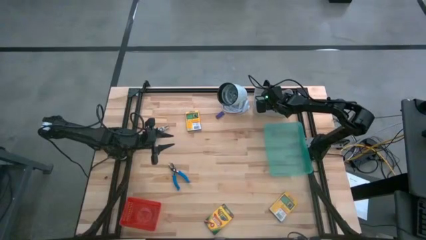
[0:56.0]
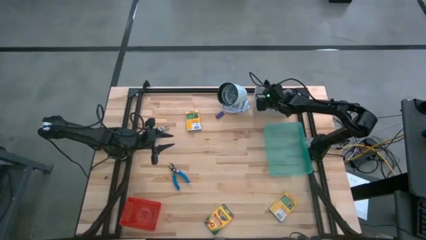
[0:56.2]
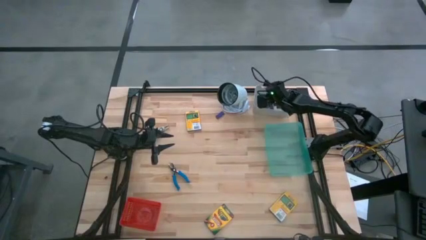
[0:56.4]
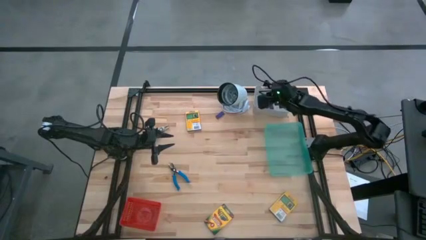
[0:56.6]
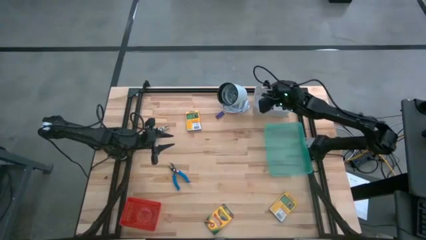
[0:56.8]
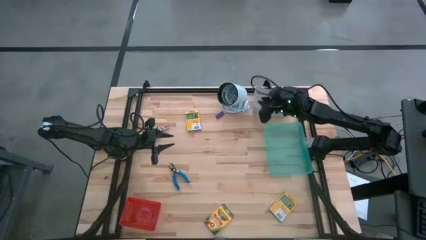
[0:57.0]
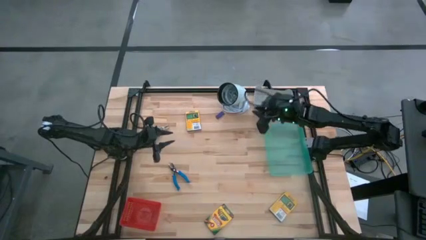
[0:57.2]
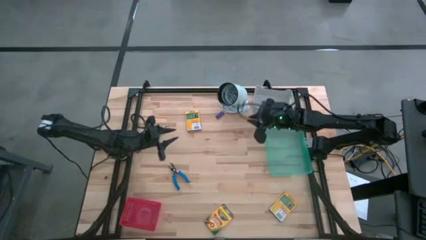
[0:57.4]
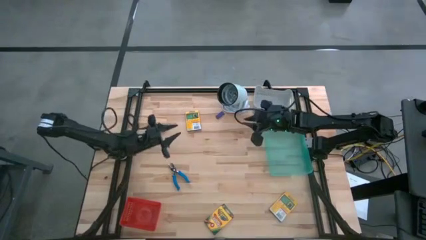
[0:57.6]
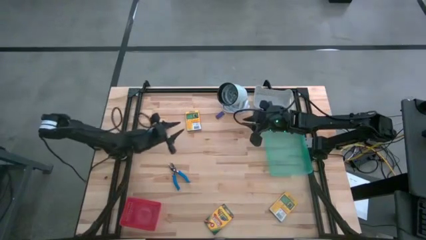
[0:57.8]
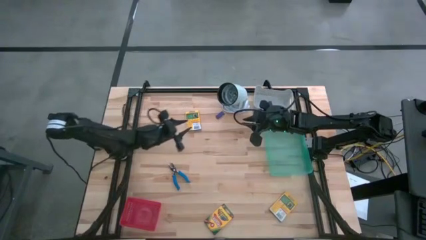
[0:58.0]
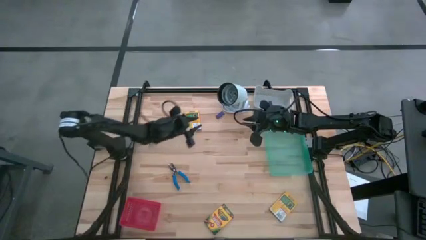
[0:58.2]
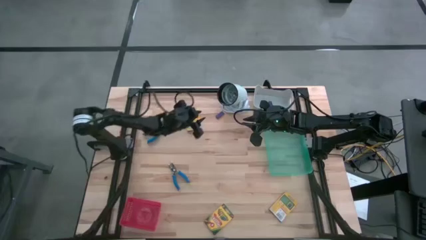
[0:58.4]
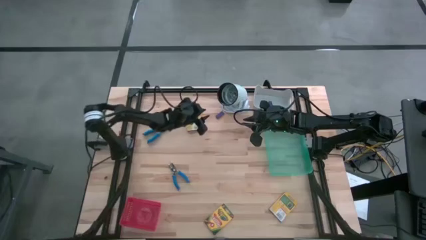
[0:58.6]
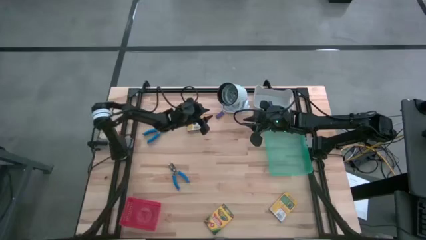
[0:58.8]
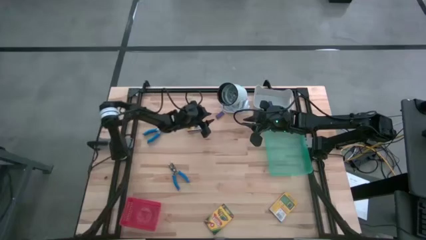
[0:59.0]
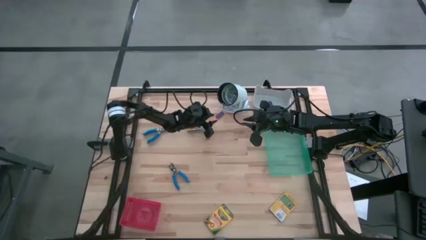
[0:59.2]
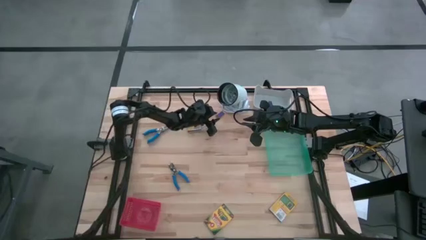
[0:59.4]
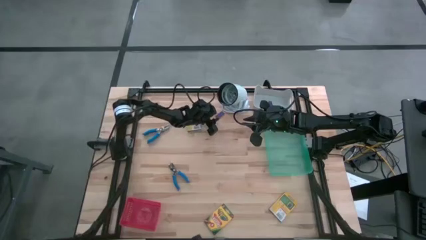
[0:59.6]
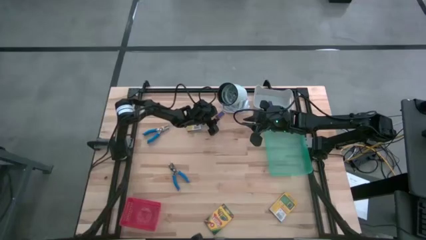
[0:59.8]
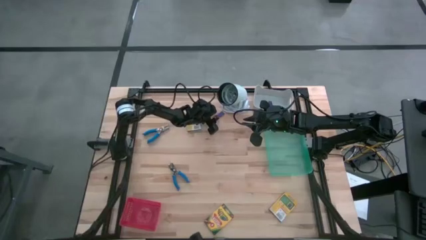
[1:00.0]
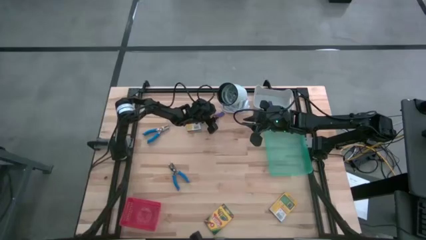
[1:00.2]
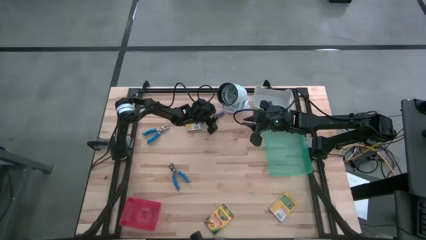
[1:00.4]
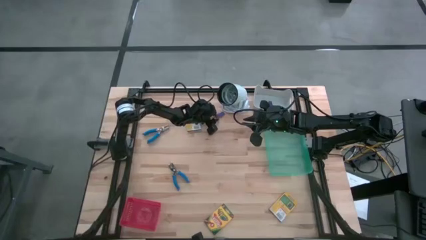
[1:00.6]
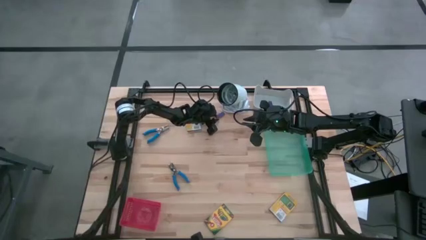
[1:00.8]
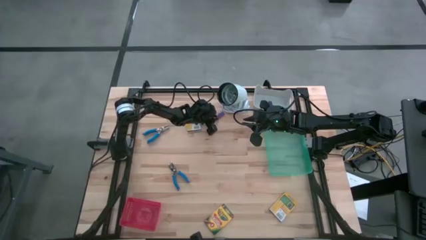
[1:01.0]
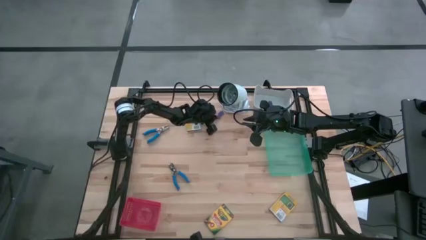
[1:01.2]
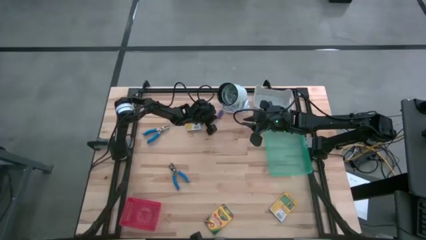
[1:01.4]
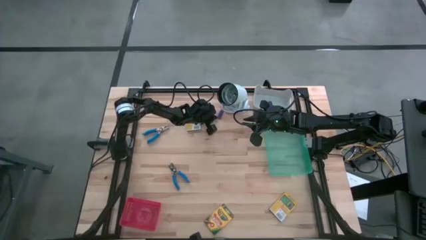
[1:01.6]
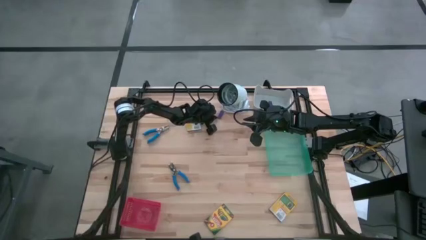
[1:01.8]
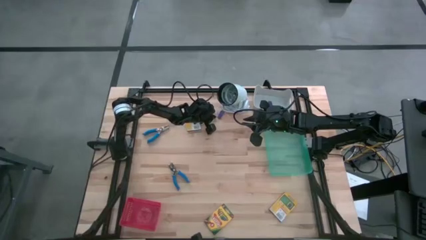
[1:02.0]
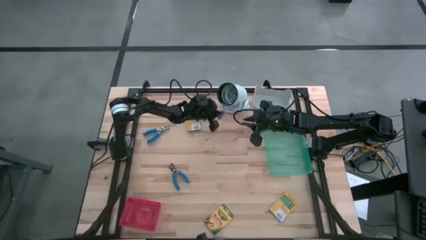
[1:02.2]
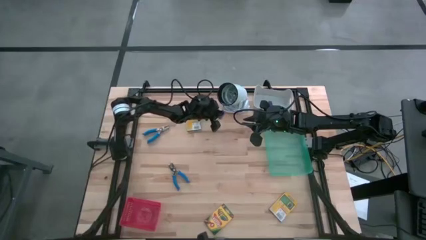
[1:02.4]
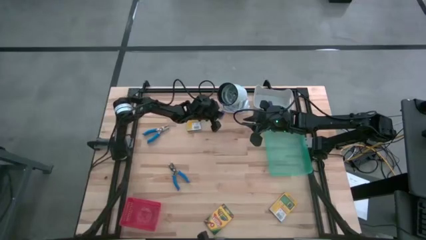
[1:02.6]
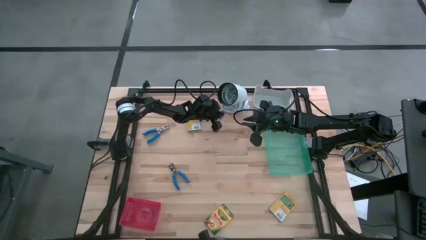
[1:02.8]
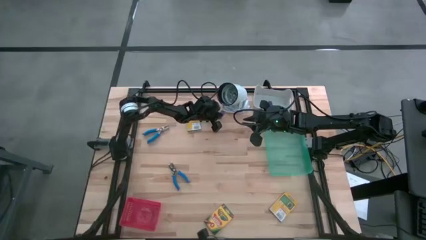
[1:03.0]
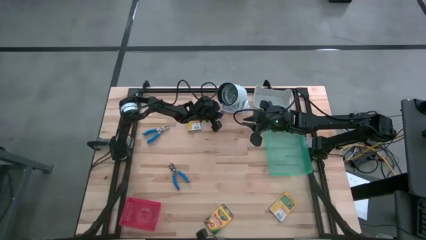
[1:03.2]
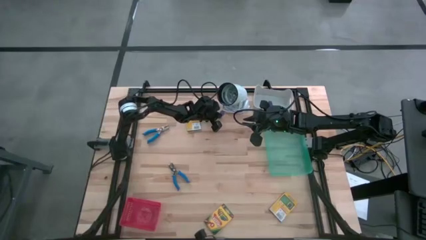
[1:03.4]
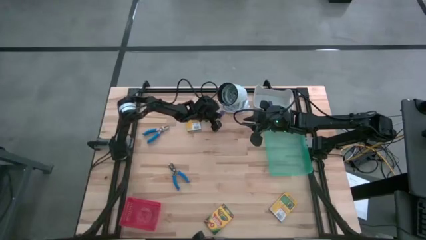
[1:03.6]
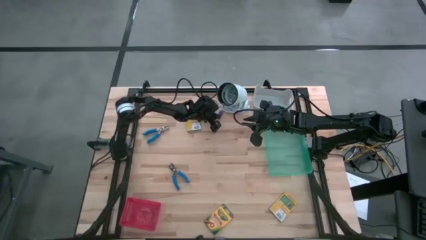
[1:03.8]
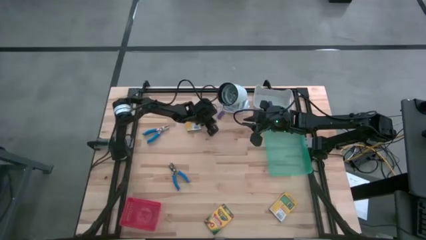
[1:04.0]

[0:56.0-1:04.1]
Task: Pick & Place School Supplies
Put the blue eraser into the gray bin

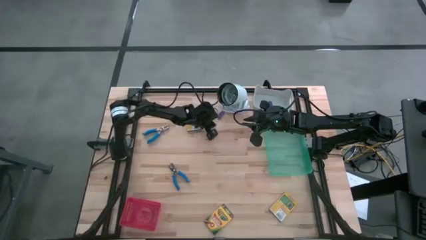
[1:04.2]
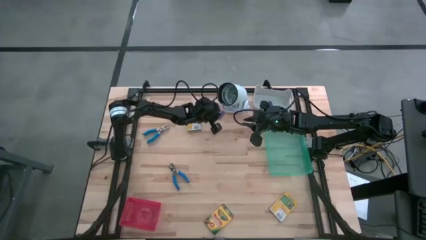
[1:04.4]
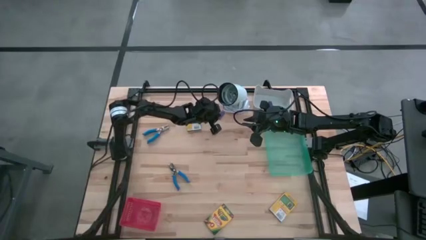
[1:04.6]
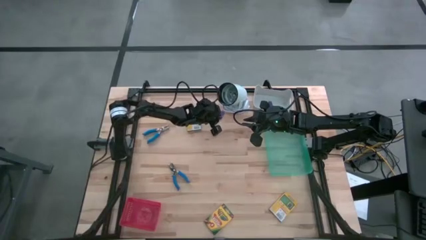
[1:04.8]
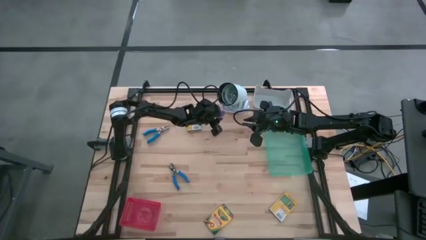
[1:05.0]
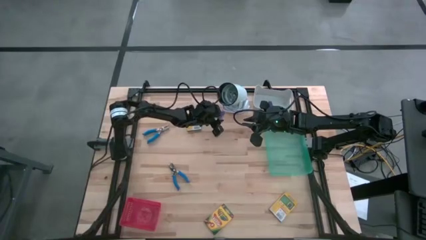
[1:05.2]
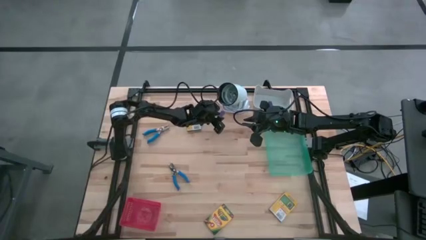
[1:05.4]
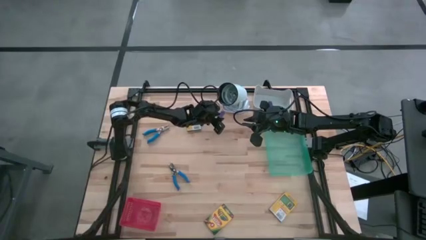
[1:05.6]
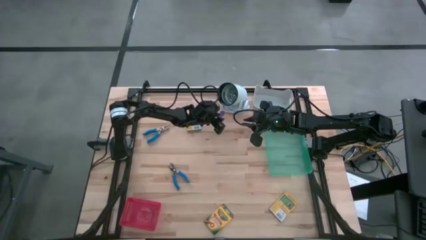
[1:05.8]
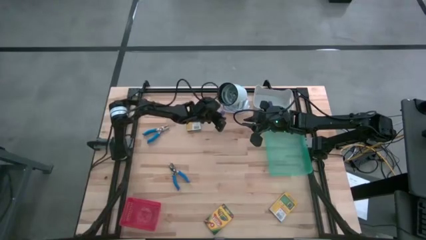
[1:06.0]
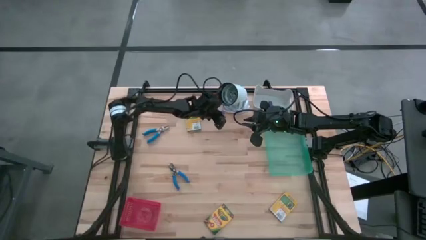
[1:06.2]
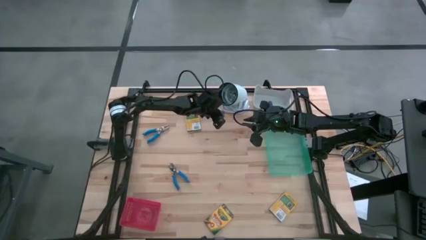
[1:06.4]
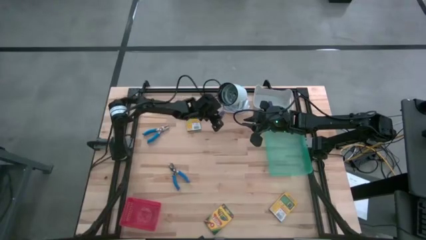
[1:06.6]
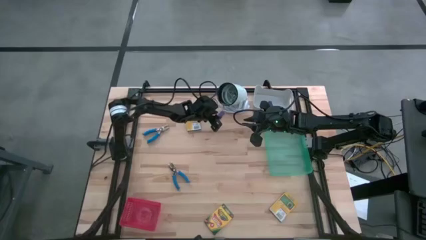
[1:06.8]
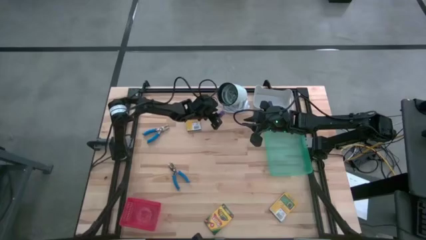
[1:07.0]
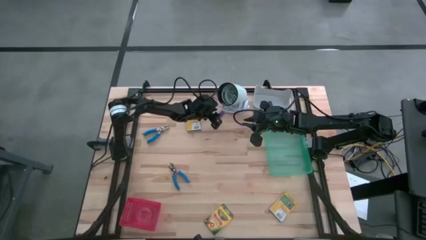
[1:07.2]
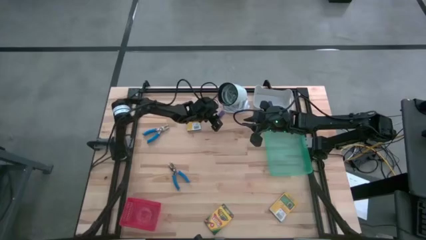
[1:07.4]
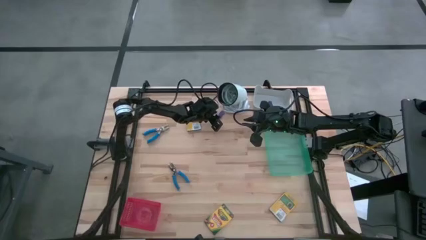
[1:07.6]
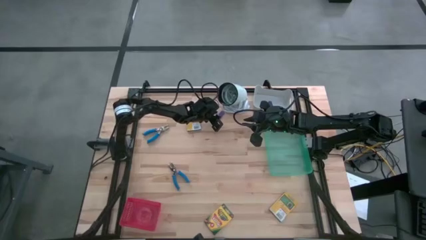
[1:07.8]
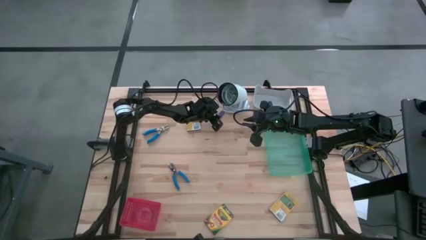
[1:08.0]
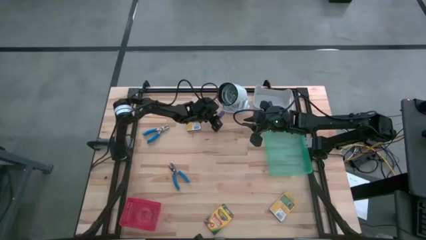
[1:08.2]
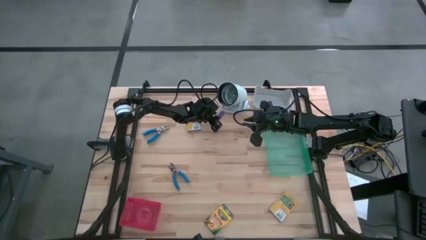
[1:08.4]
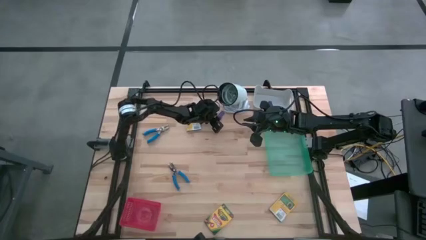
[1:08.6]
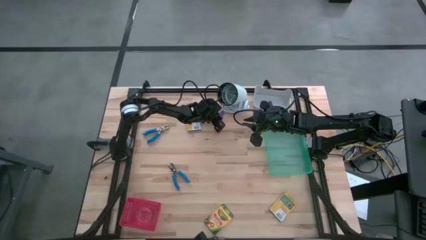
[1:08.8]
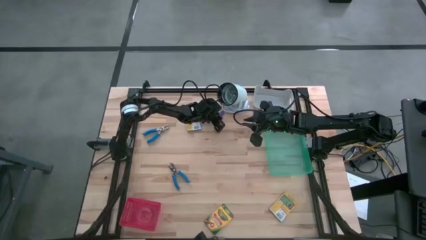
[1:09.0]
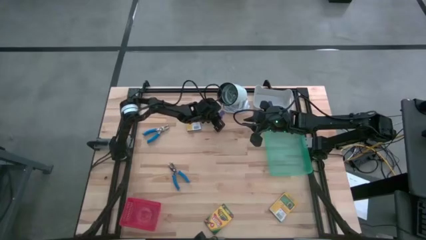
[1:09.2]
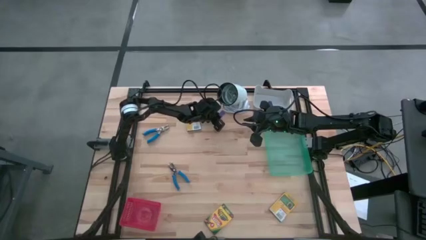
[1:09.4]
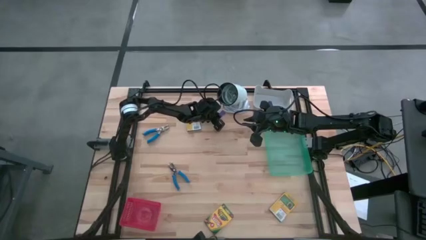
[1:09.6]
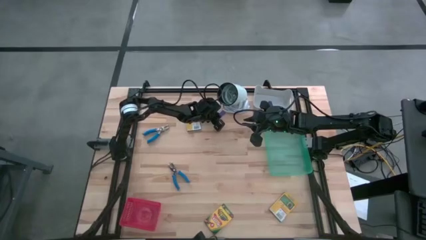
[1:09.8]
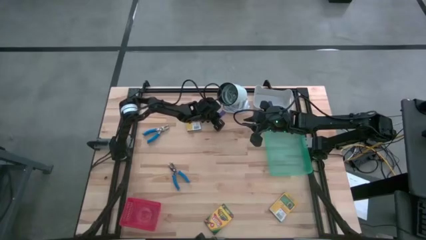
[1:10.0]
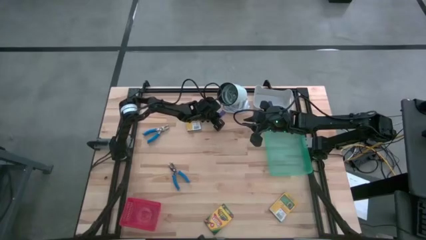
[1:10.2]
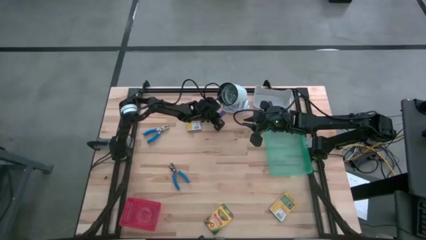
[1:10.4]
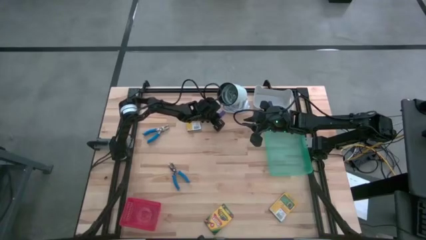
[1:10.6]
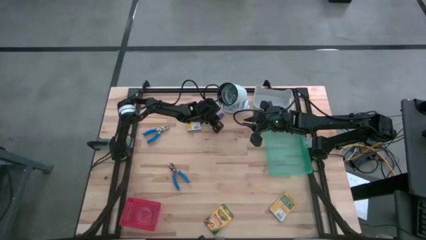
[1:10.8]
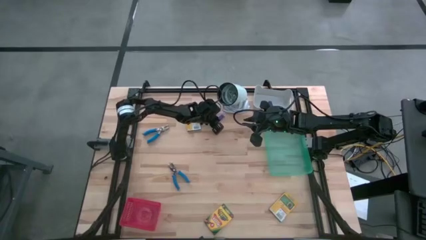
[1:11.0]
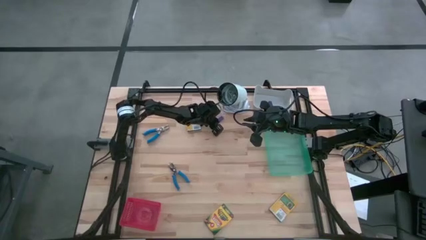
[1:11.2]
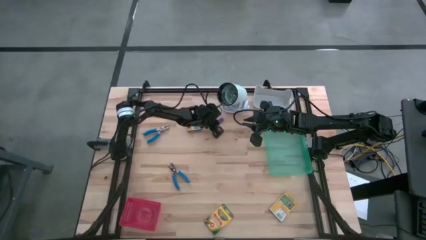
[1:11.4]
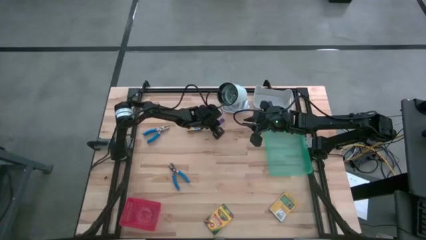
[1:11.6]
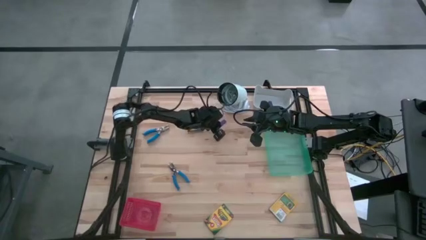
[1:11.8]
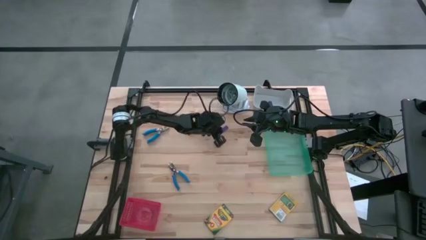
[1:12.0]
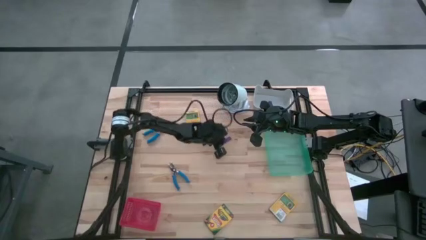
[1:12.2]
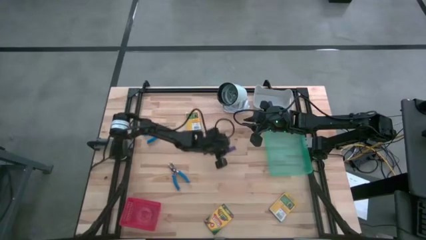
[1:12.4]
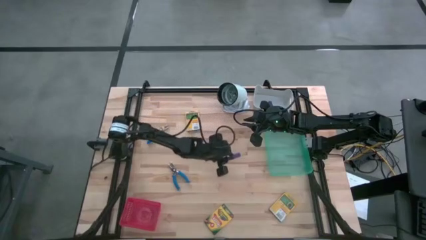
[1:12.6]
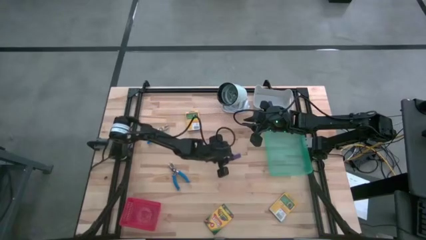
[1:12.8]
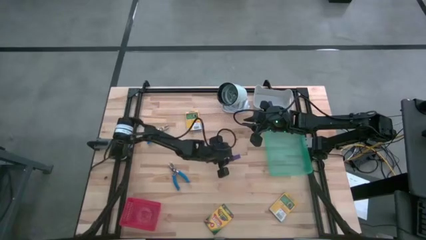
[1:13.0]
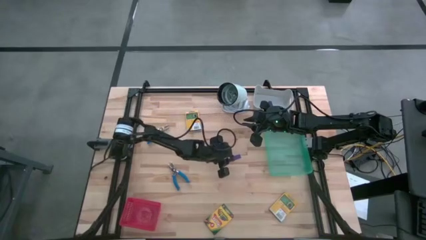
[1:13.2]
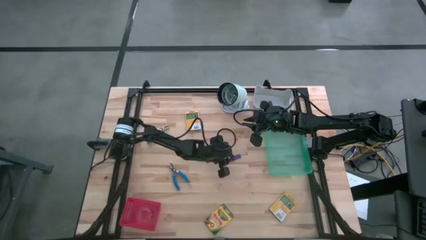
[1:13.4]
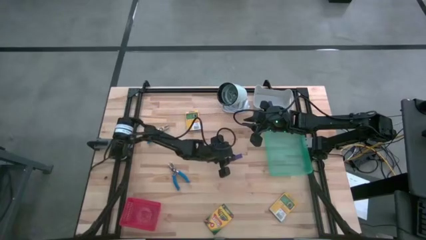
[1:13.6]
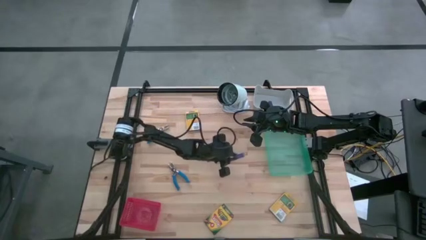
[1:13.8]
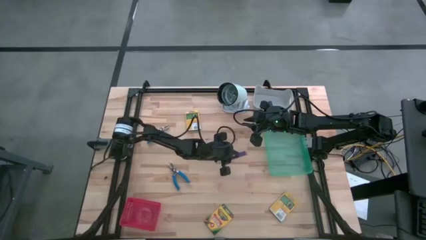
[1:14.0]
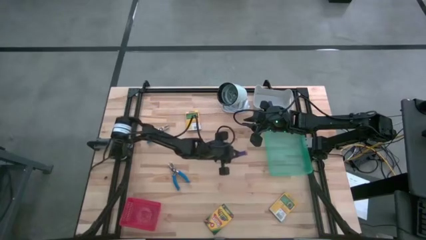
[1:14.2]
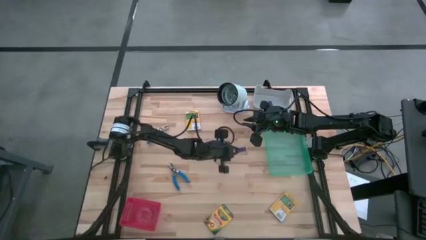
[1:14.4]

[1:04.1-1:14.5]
Put the blue eraser into the gray bin
